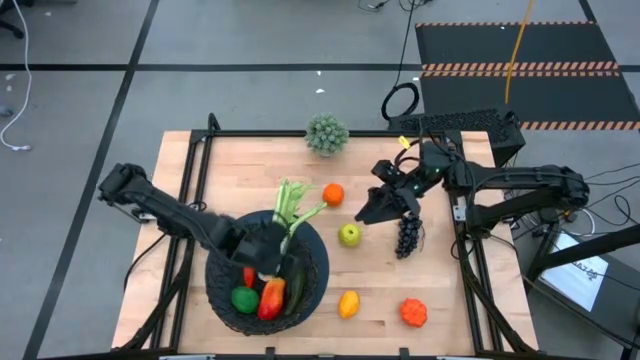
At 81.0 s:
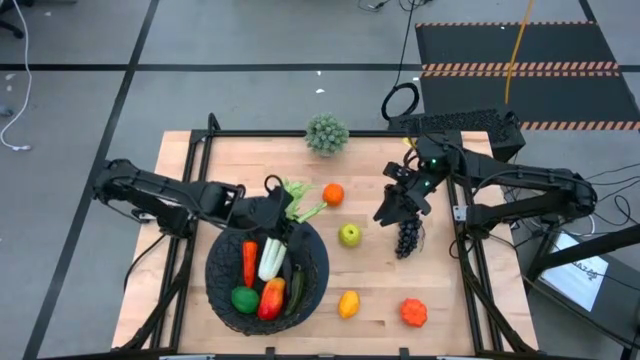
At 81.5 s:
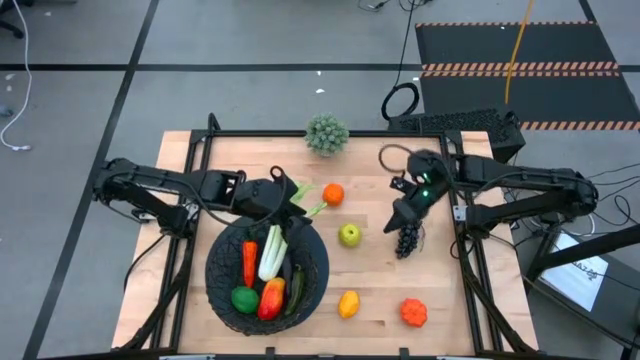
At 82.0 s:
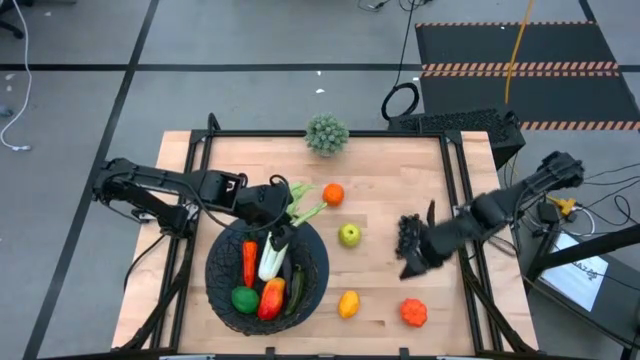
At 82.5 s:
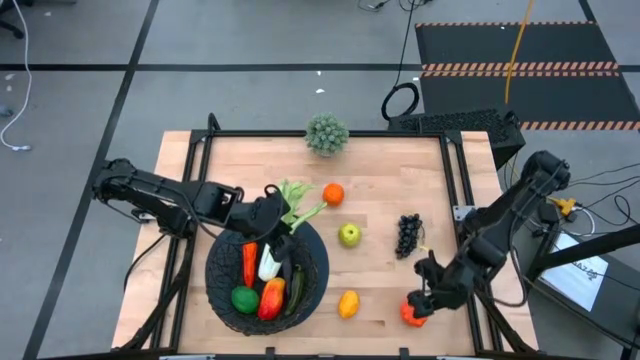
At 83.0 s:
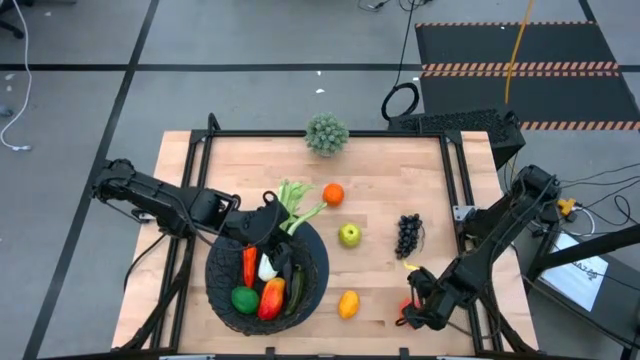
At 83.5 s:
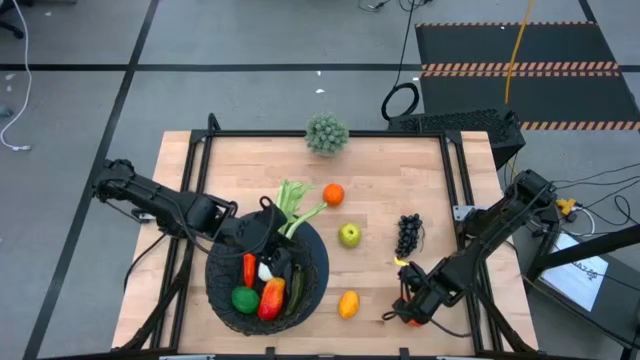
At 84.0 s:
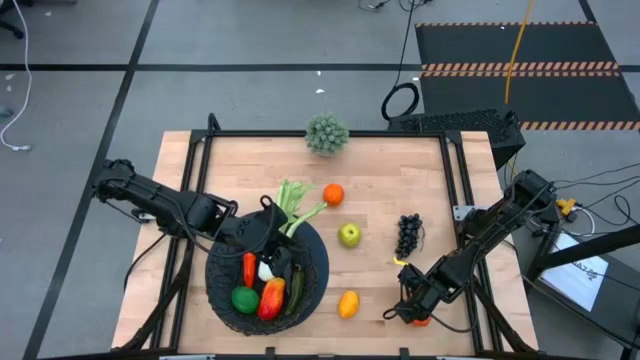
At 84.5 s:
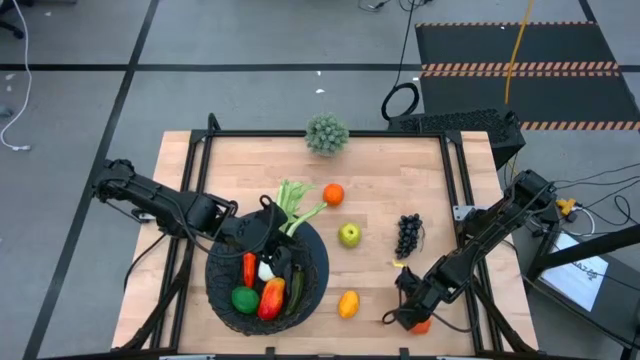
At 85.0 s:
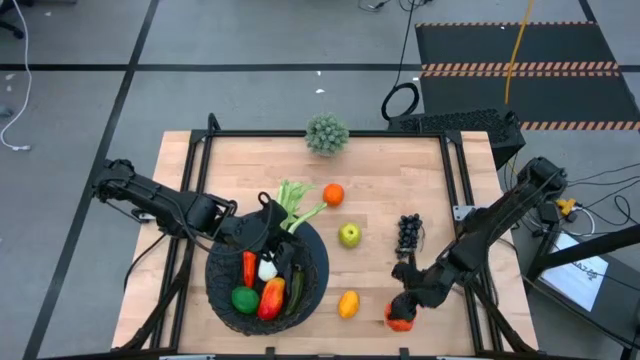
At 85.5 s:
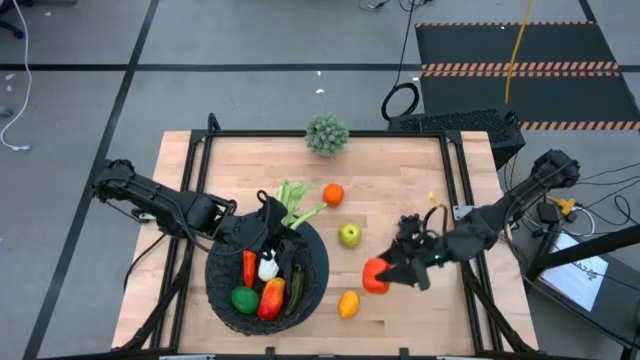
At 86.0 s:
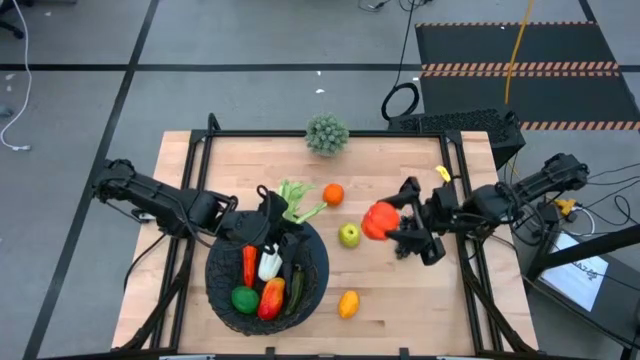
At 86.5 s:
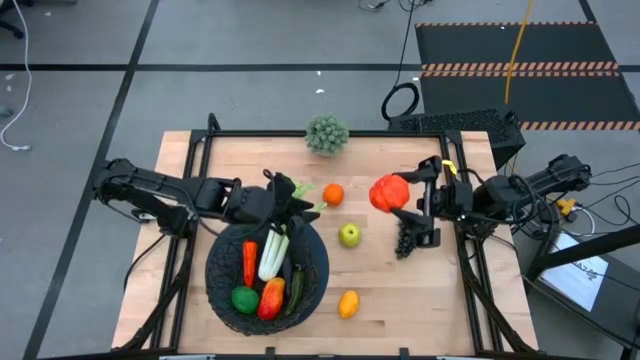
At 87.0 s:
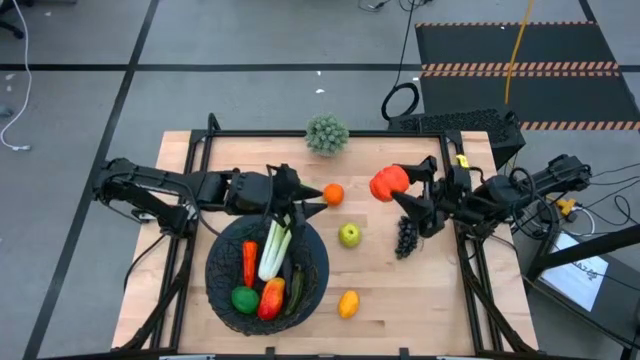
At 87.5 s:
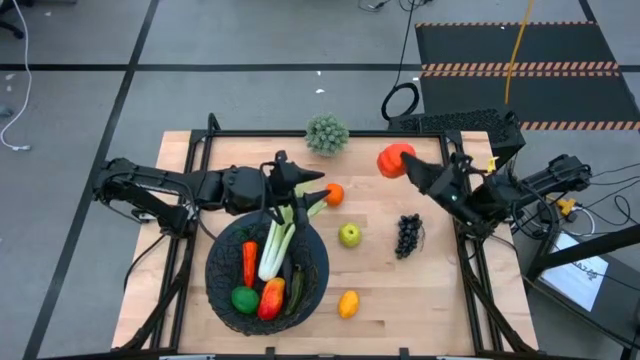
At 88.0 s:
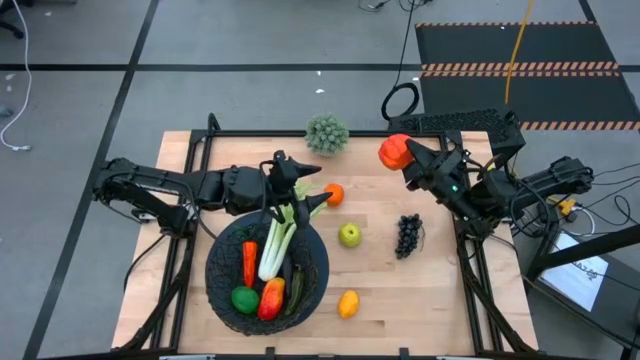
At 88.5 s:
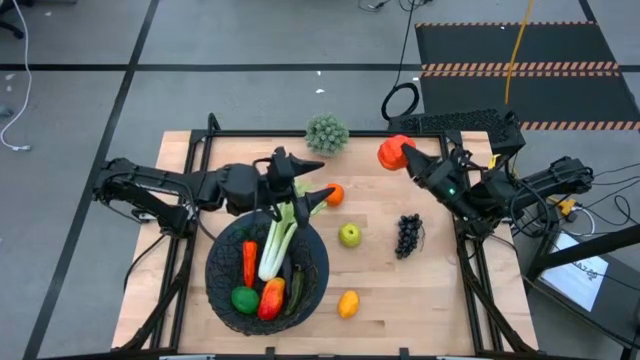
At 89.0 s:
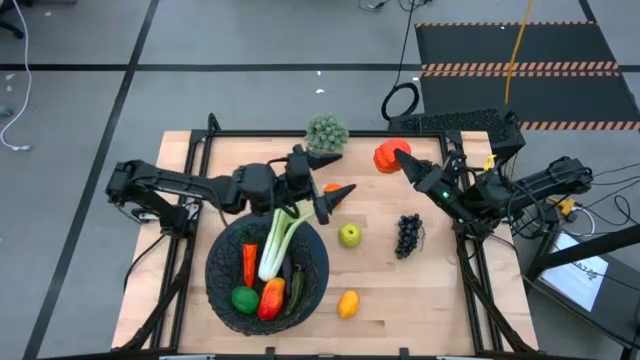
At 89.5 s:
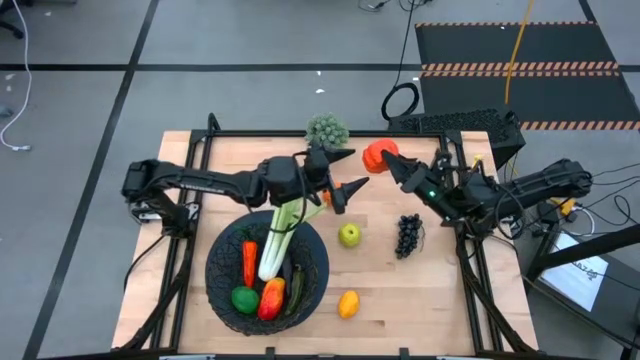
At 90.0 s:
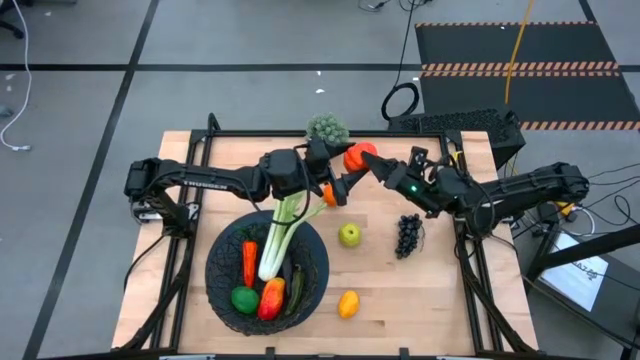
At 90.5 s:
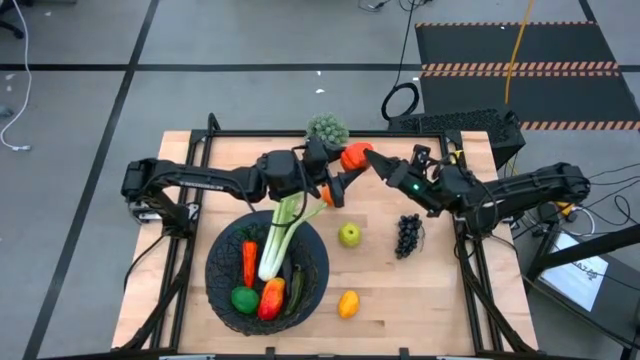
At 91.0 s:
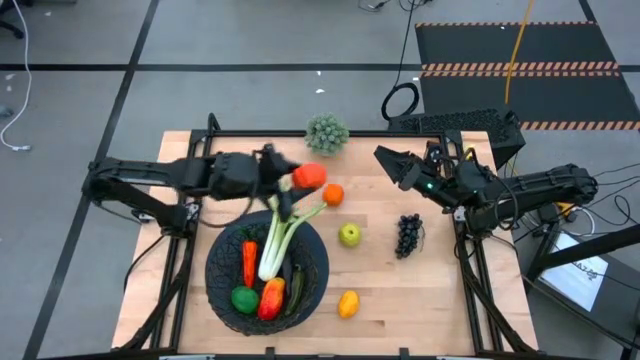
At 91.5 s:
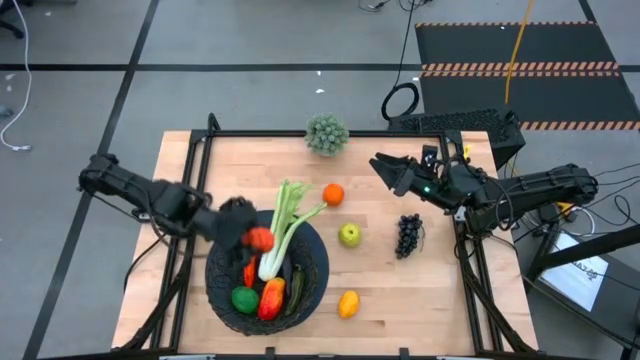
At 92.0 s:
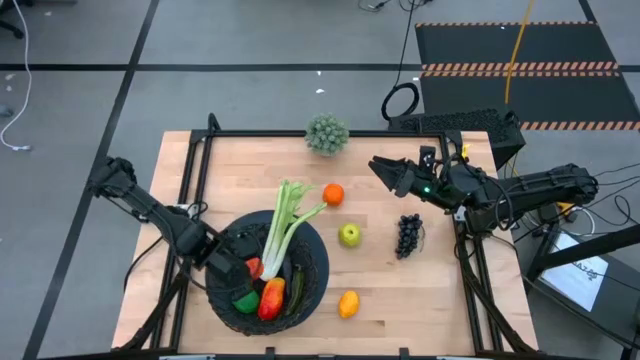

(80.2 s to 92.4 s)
Task: Build produce basket
Put the orange pumpkin into the black wire basket

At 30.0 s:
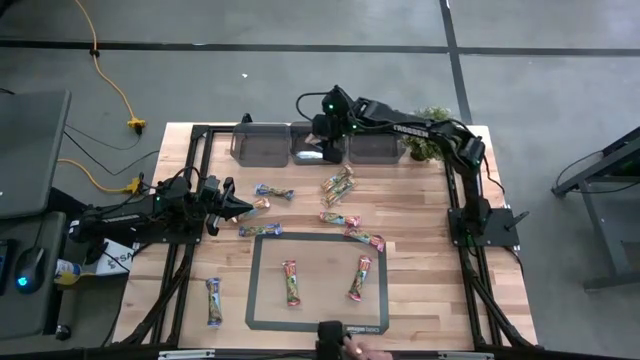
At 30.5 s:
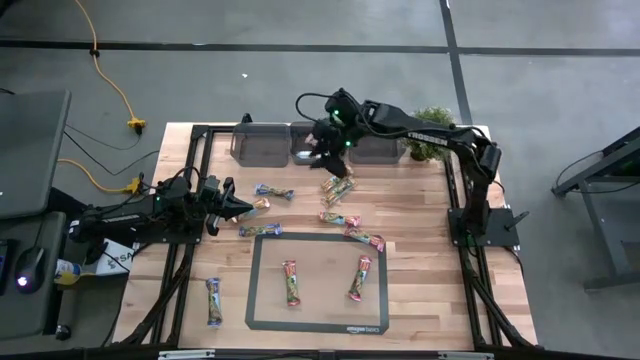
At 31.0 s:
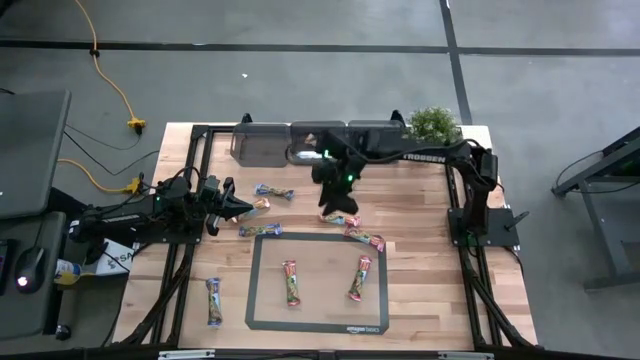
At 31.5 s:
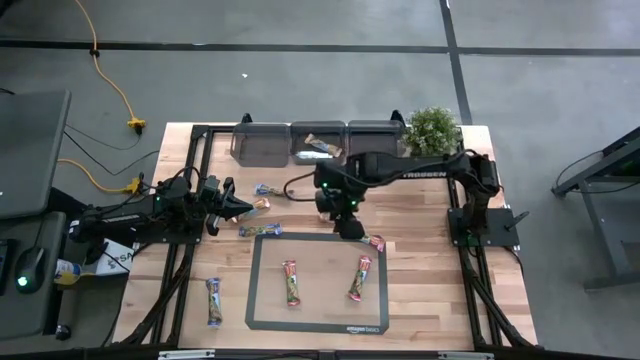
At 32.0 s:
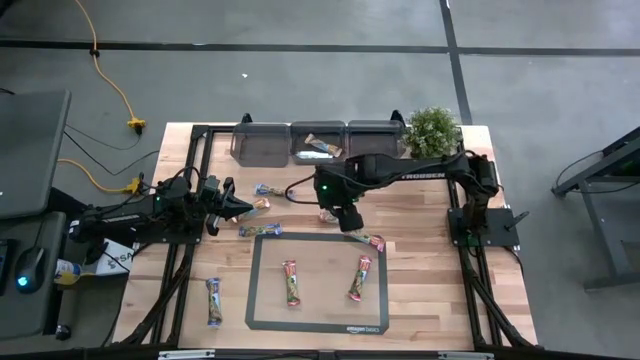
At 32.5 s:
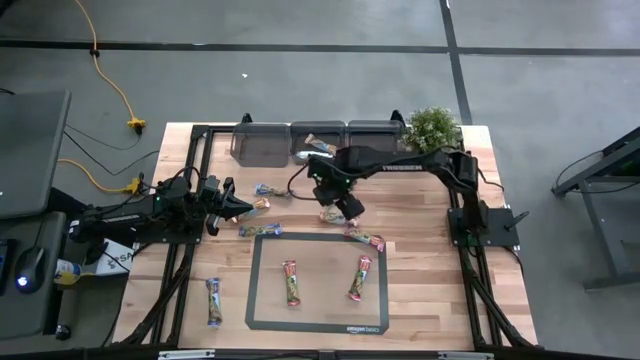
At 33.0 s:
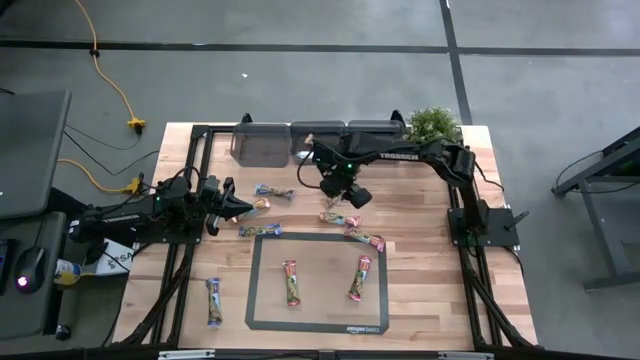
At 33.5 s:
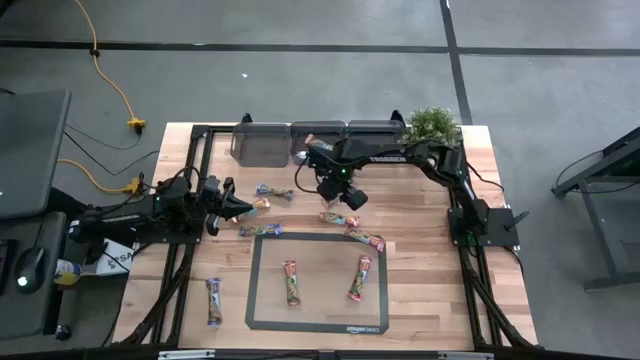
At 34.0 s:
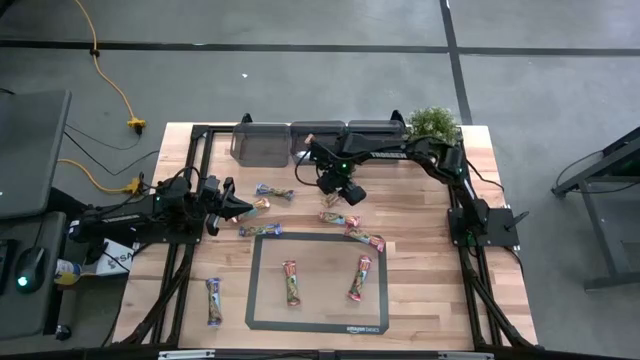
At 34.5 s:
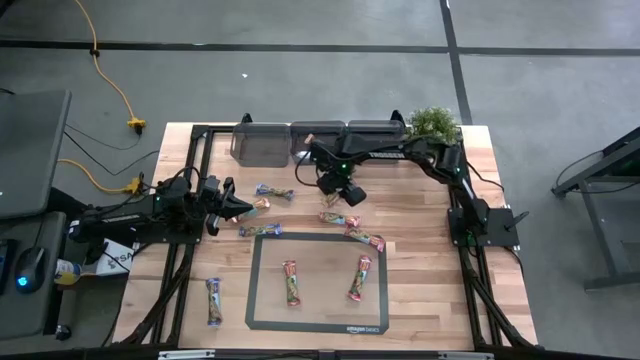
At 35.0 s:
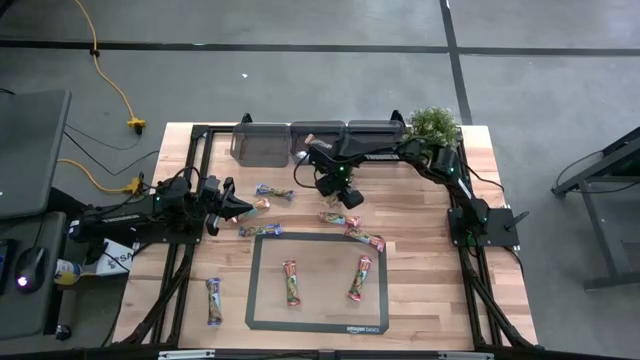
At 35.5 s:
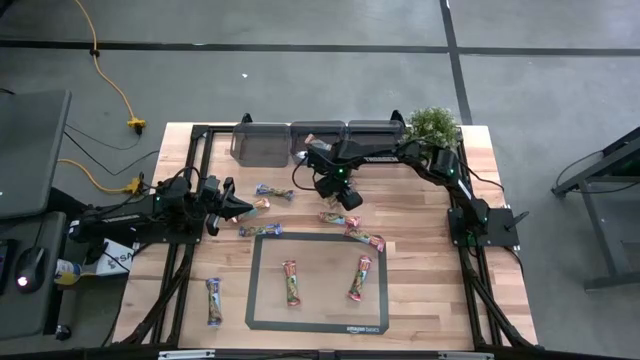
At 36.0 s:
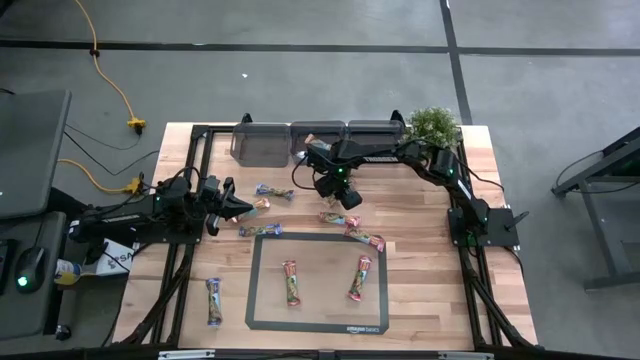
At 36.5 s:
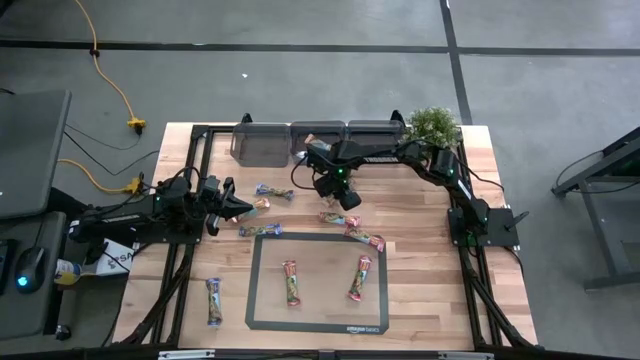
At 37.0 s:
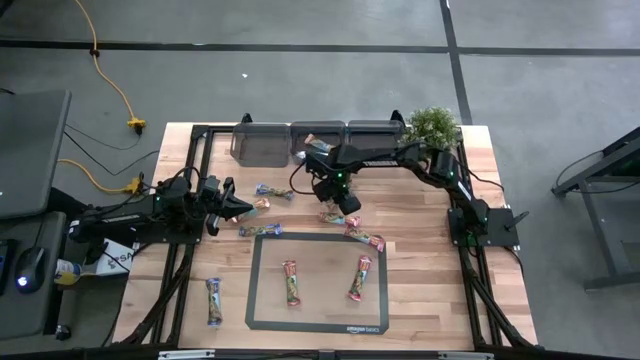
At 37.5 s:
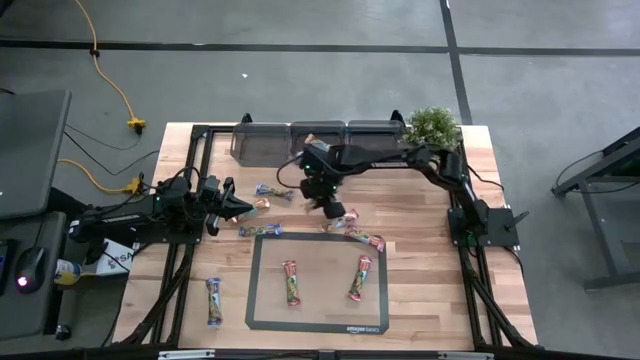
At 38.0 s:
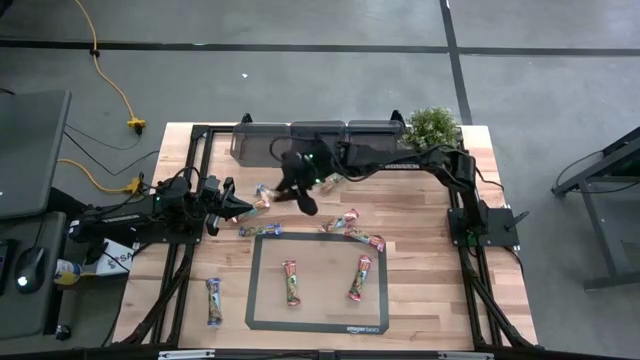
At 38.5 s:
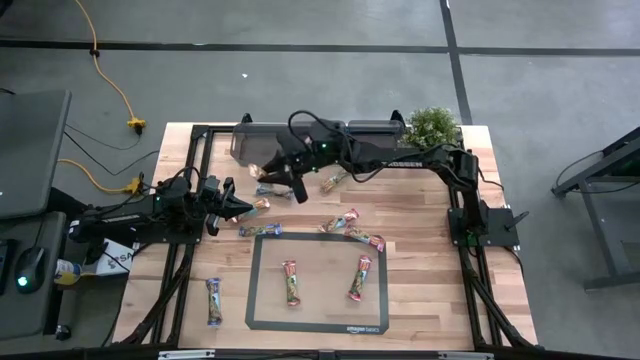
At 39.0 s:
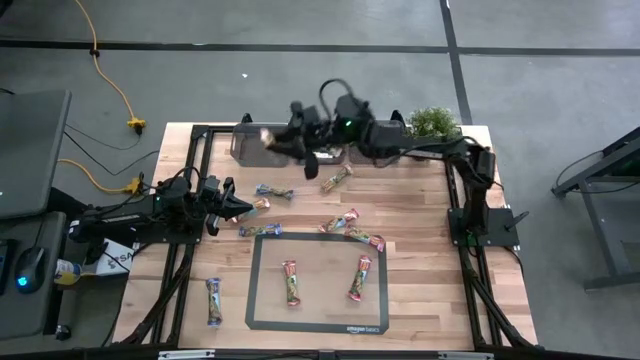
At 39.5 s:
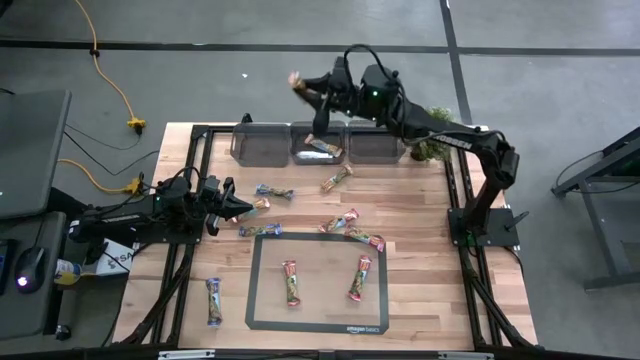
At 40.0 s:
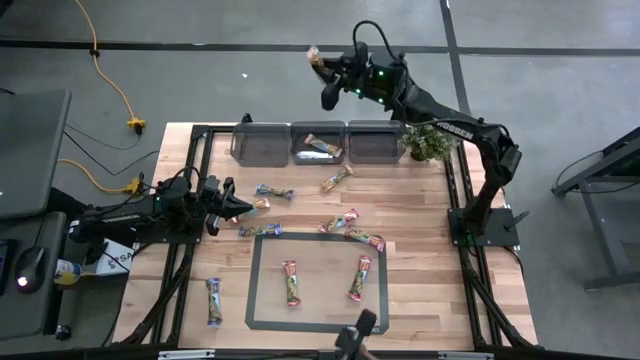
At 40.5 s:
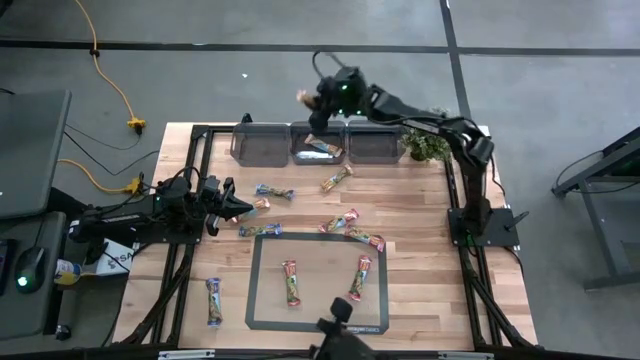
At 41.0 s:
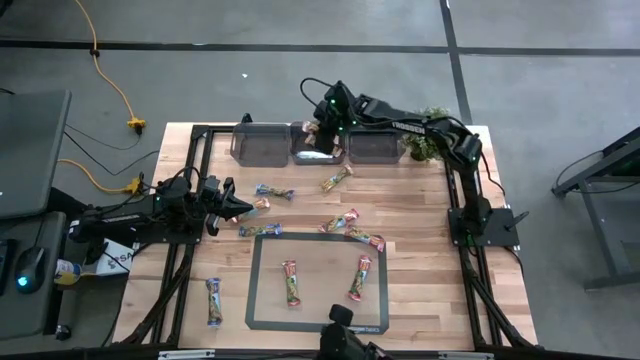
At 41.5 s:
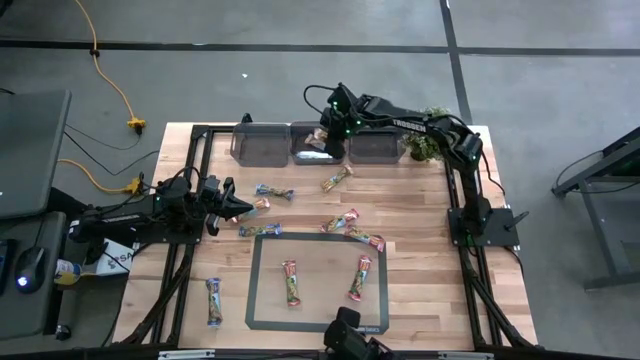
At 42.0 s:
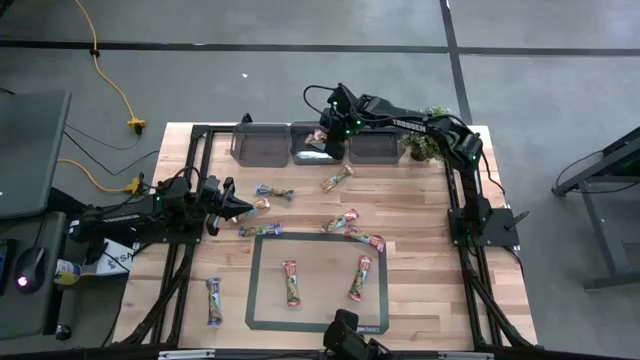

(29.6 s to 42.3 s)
Task: Pick and place Granola Bars by type
Put the yellow granola bar into the middle black bin
